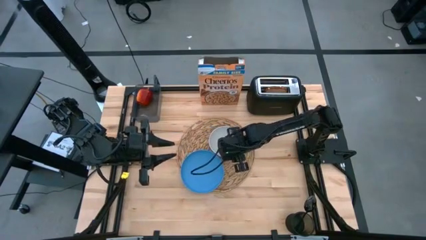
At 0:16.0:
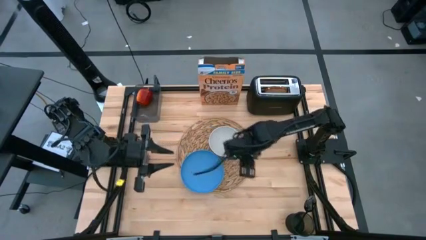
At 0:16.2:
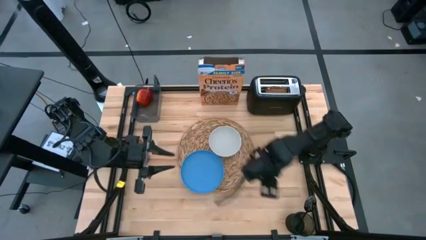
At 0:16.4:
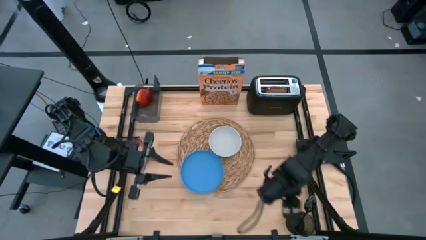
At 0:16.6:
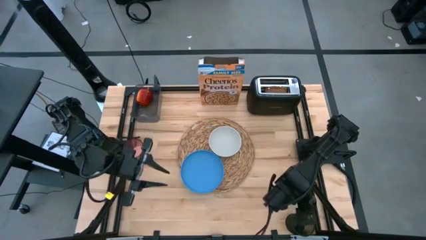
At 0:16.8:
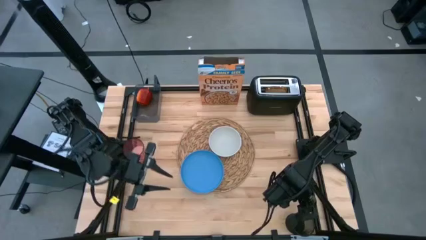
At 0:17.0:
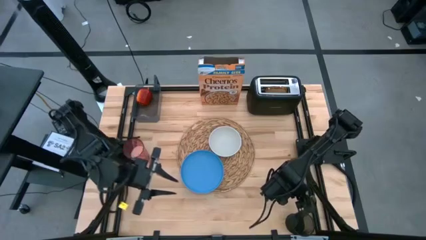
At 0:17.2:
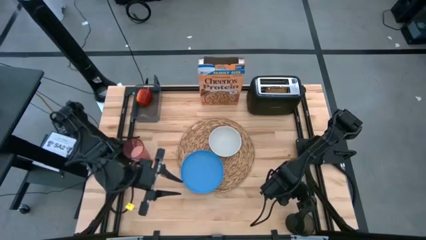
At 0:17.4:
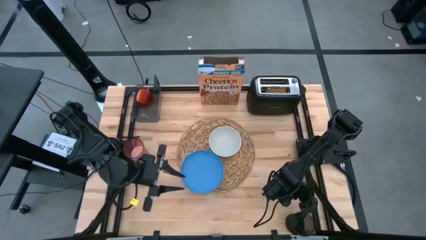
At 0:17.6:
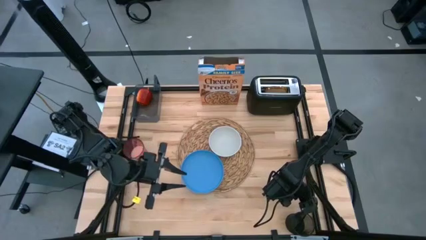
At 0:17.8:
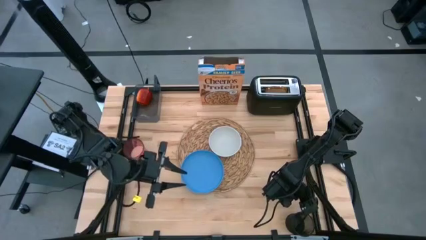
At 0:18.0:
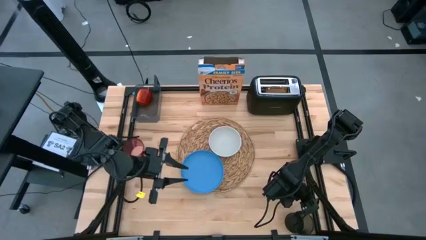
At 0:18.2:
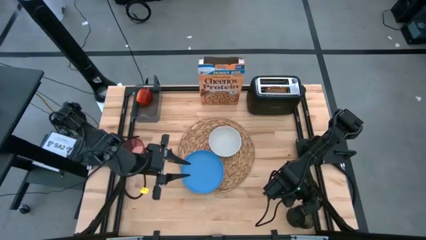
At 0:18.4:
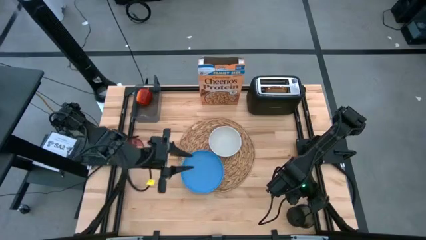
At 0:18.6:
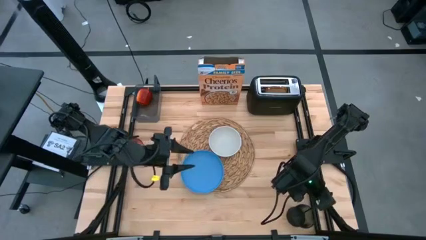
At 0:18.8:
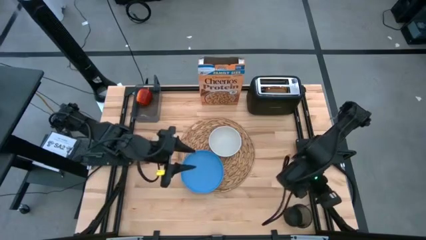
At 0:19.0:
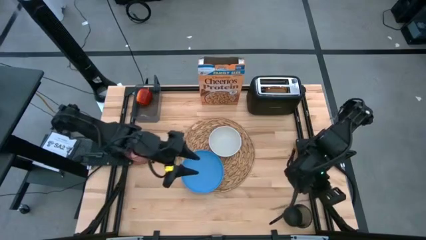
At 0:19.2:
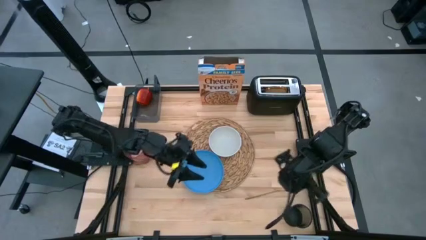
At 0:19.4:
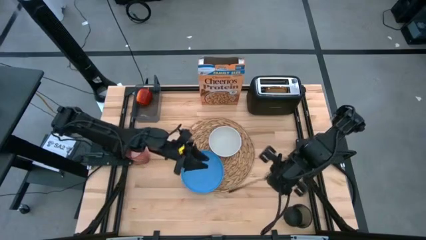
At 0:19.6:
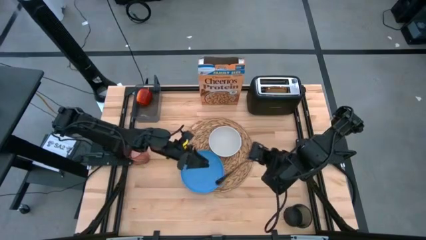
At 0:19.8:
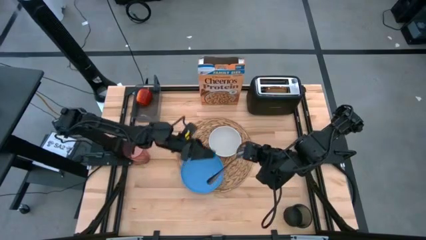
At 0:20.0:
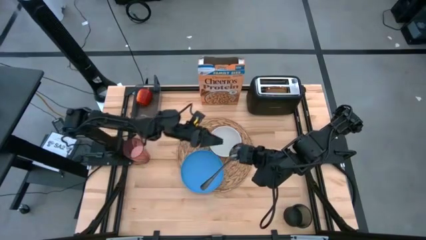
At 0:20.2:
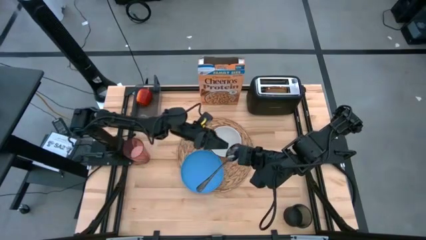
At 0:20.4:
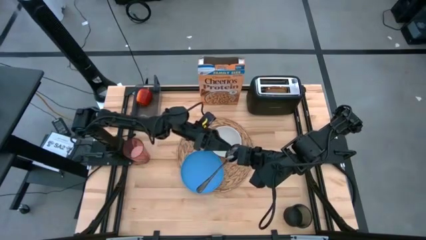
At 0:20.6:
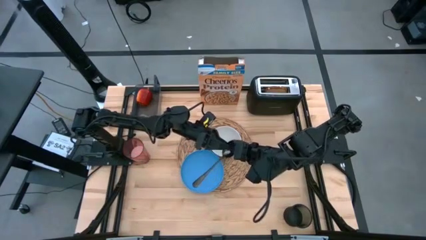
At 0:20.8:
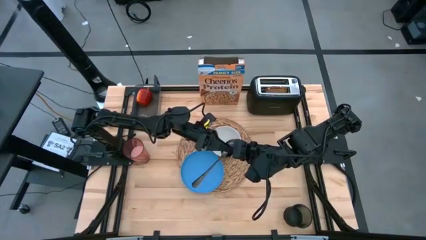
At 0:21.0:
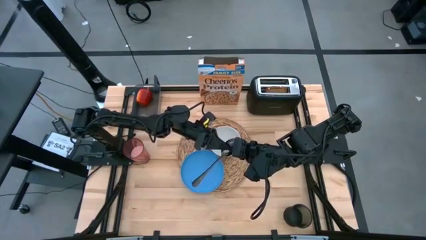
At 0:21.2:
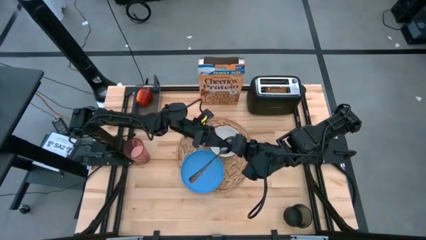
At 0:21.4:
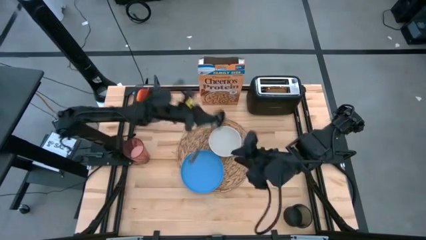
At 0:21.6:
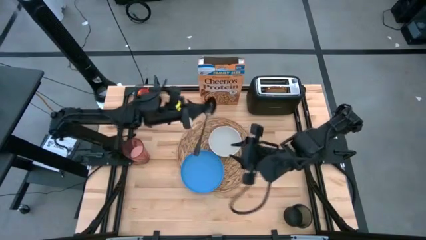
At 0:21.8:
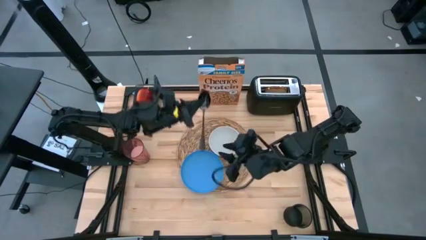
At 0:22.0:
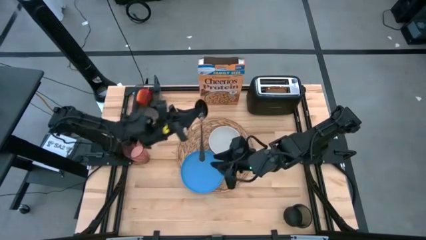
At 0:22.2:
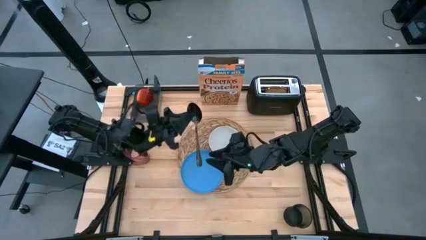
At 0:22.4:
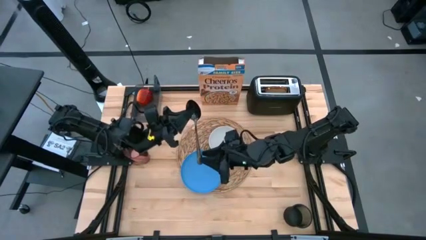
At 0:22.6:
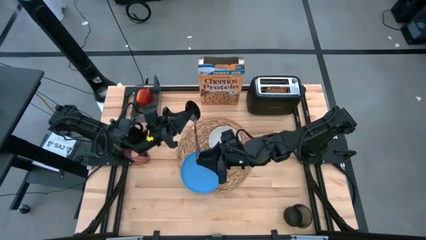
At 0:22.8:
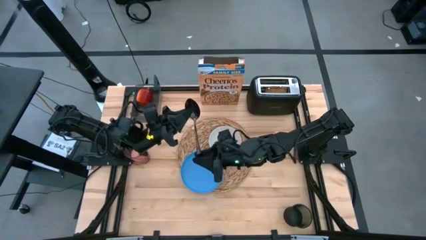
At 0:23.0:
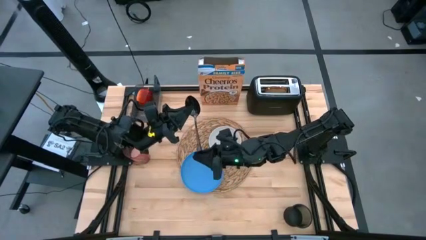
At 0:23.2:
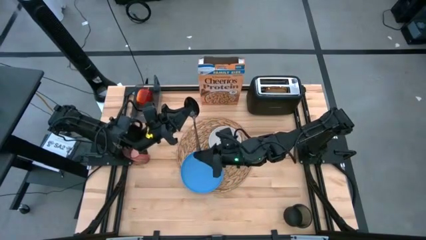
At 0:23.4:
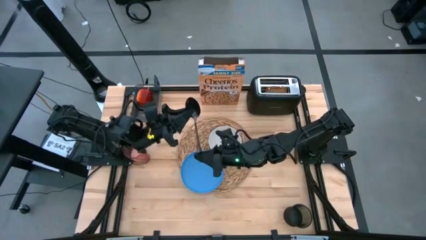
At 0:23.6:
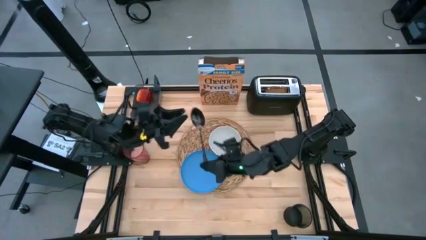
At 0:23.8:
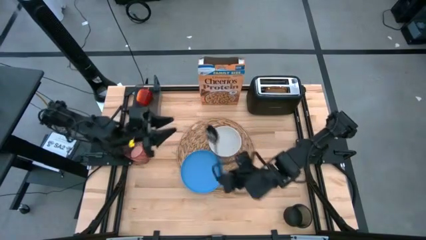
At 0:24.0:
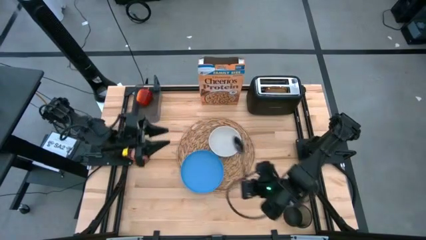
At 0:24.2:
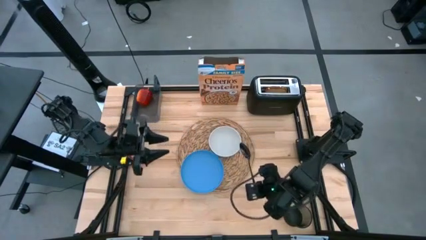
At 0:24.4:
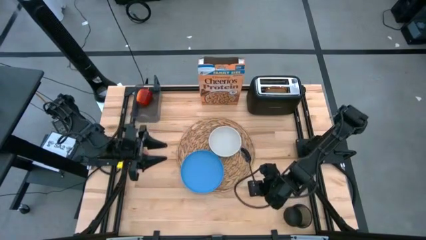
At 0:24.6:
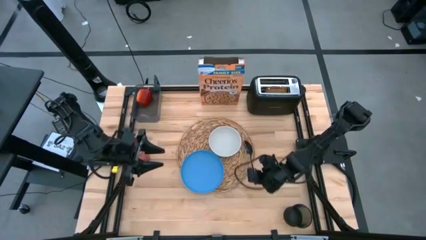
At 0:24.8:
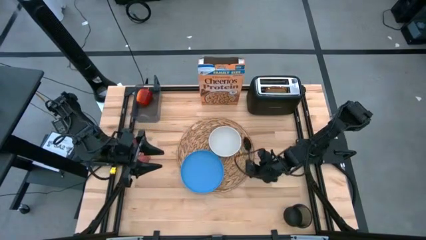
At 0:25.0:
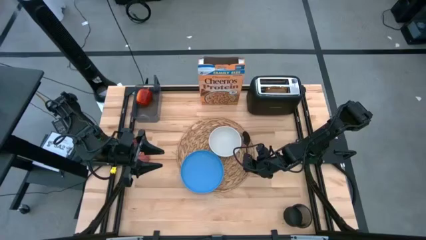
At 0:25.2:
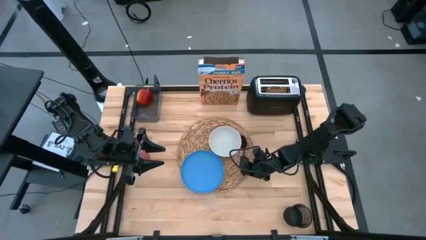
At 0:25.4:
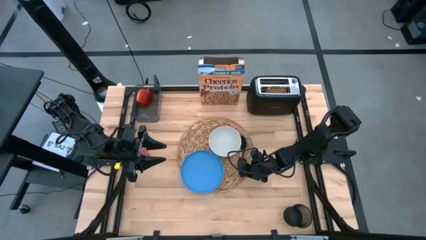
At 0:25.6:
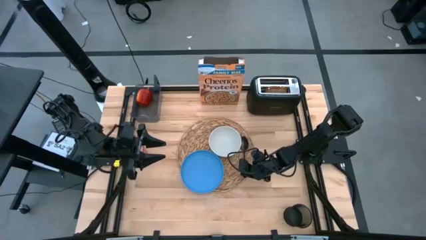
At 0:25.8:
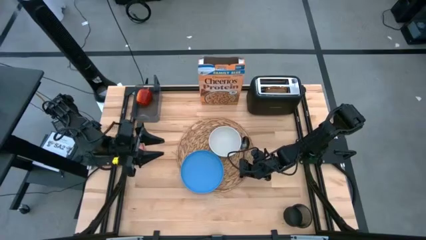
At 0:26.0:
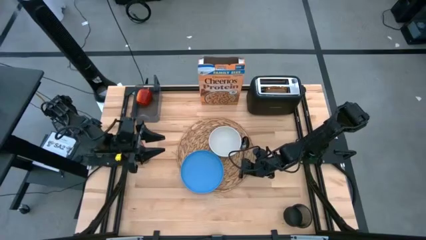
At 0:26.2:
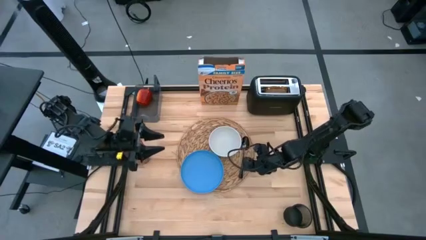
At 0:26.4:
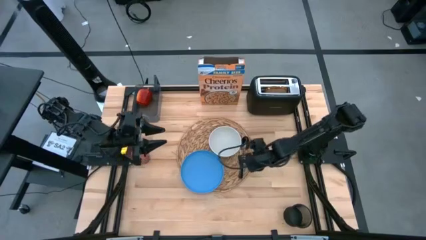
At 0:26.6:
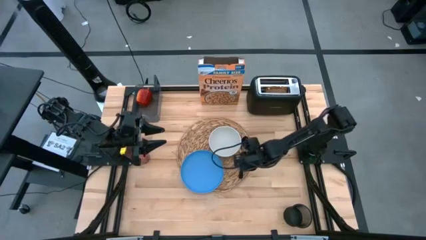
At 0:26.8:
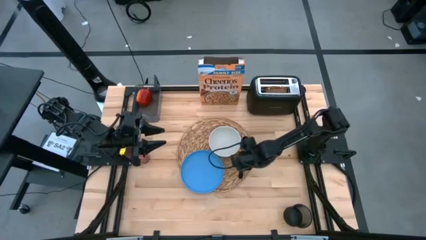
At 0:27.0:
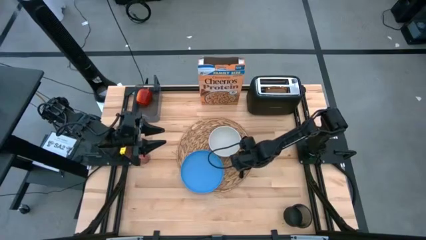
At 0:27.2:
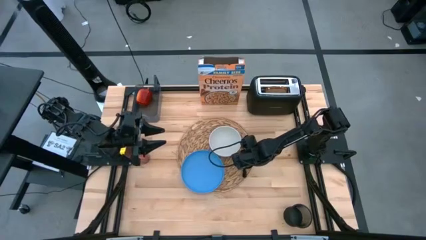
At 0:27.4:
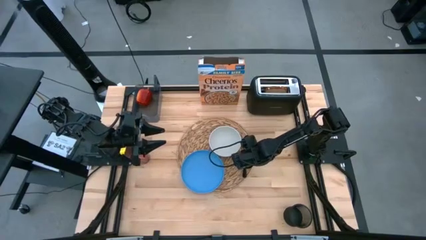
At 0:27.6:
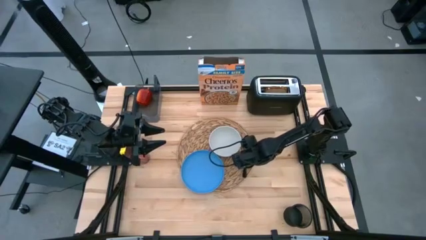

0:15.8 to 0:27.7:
Task: Arrange a breakfast setting
Put the black spoon on the brown table mat to the right of the blue plate
